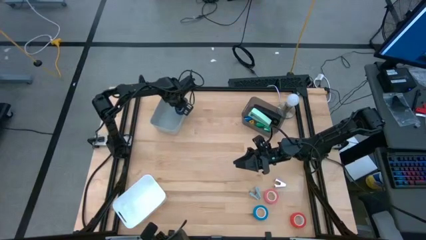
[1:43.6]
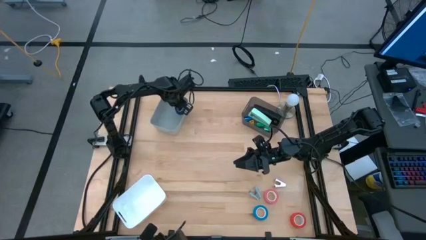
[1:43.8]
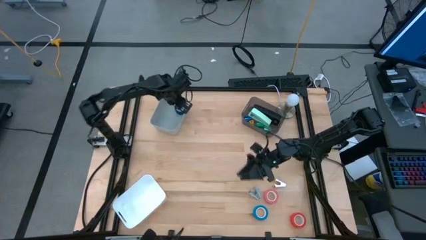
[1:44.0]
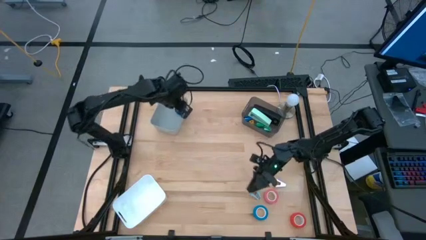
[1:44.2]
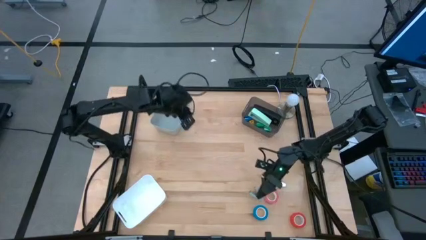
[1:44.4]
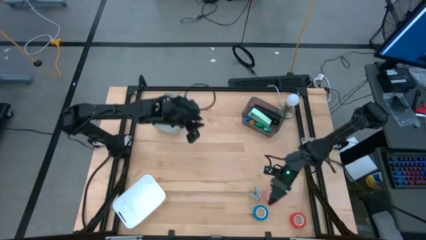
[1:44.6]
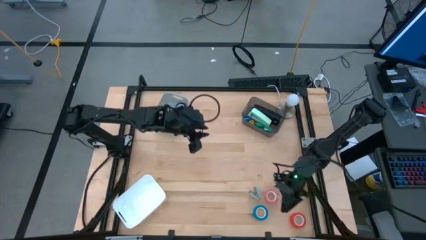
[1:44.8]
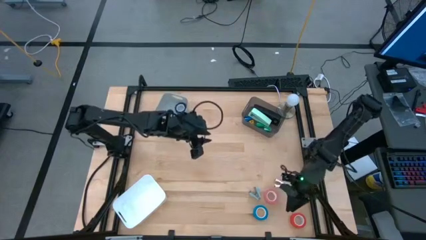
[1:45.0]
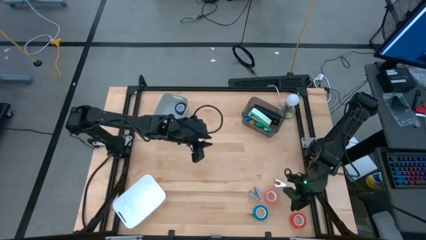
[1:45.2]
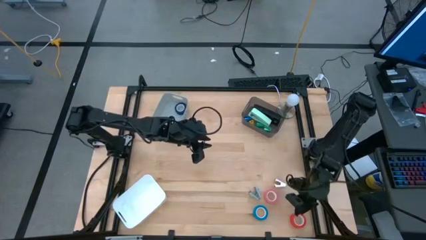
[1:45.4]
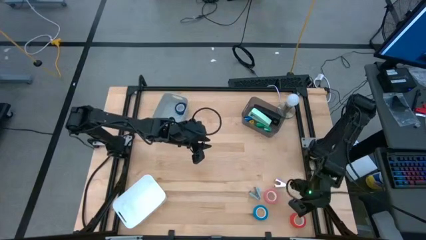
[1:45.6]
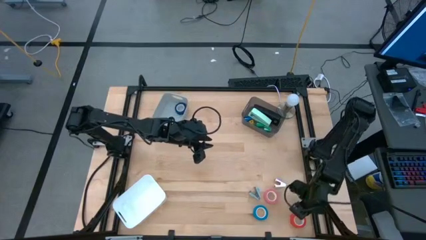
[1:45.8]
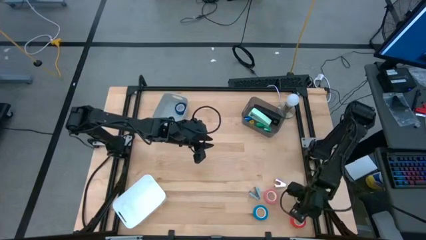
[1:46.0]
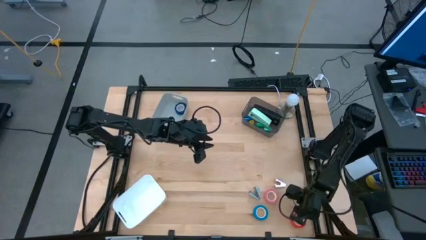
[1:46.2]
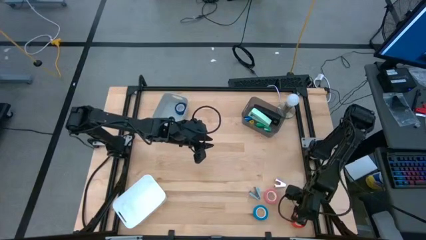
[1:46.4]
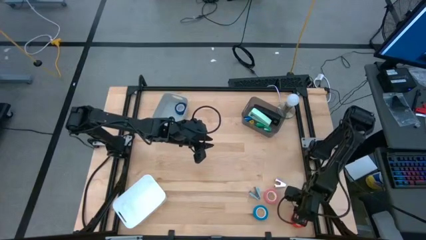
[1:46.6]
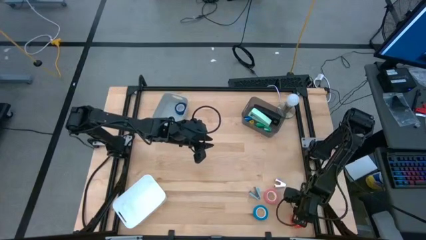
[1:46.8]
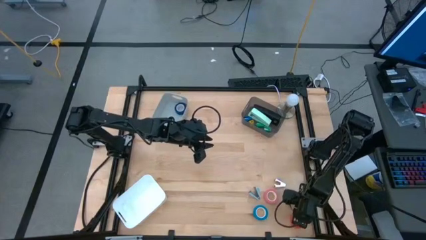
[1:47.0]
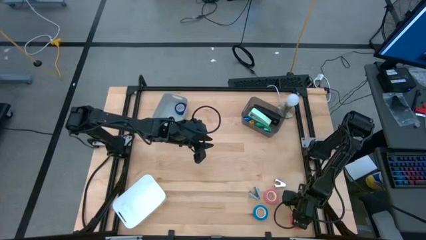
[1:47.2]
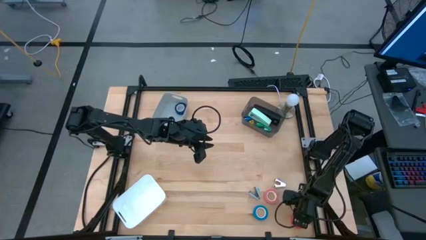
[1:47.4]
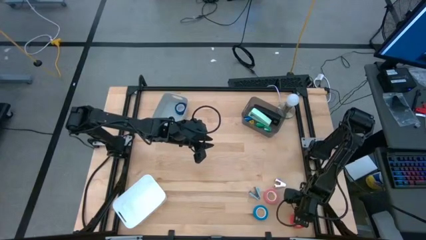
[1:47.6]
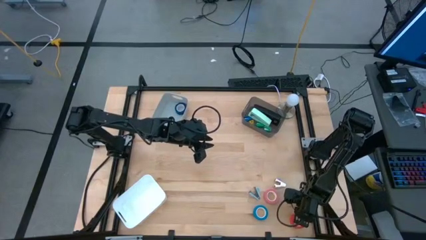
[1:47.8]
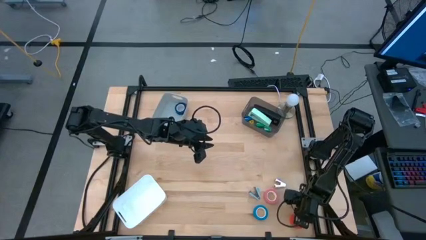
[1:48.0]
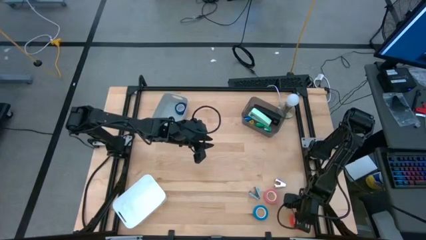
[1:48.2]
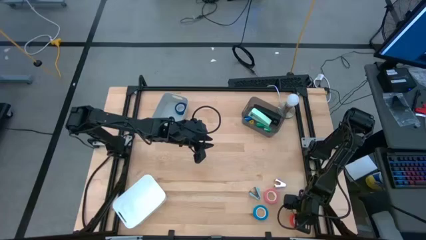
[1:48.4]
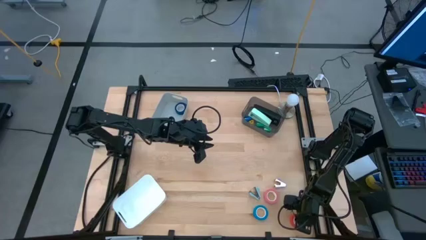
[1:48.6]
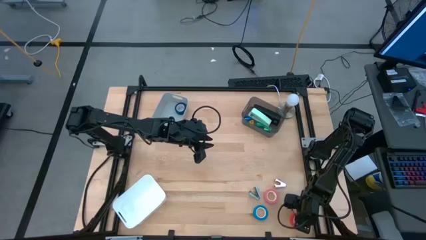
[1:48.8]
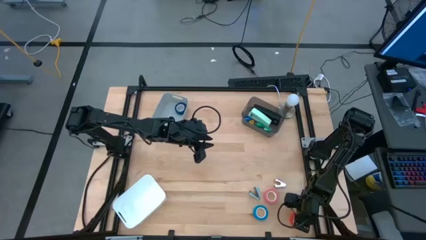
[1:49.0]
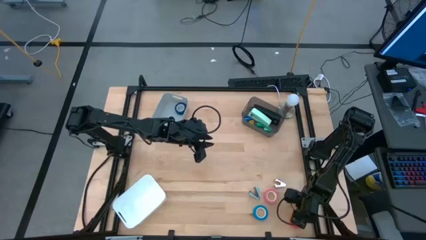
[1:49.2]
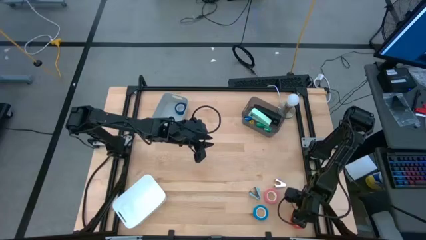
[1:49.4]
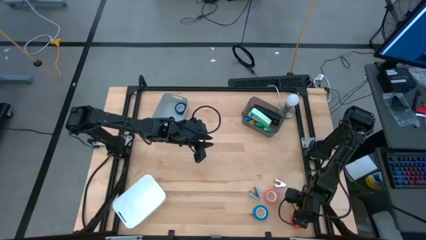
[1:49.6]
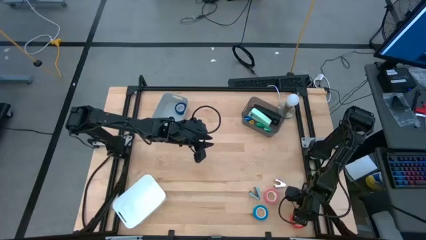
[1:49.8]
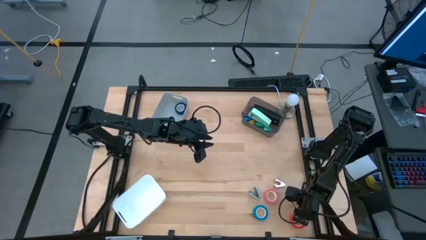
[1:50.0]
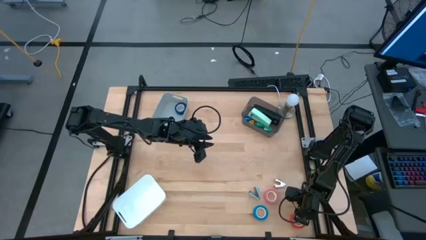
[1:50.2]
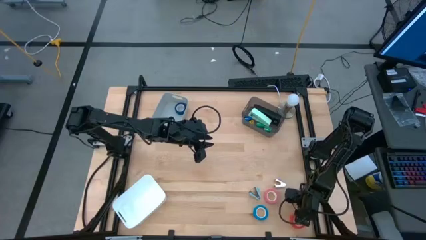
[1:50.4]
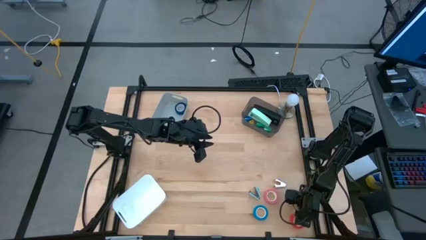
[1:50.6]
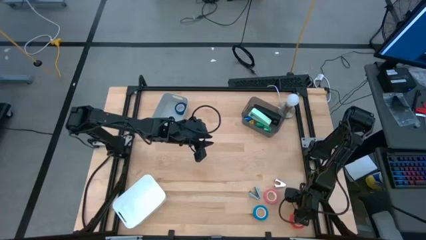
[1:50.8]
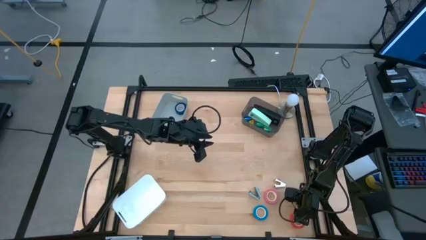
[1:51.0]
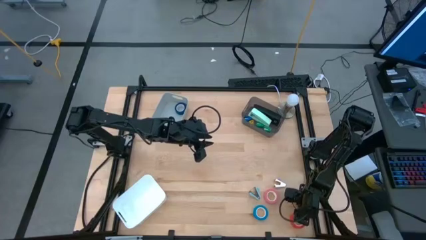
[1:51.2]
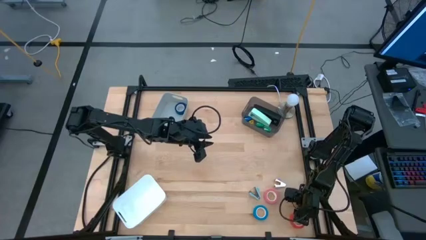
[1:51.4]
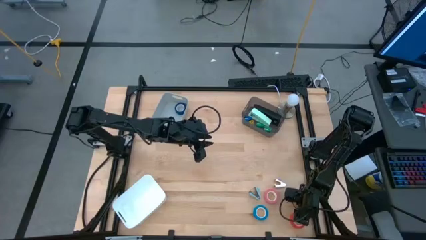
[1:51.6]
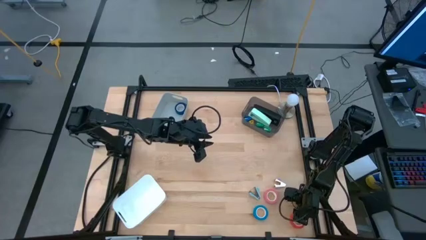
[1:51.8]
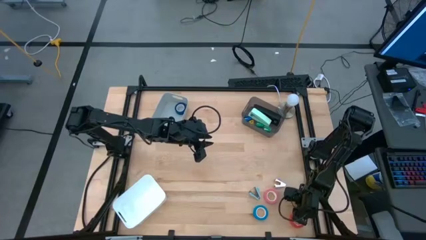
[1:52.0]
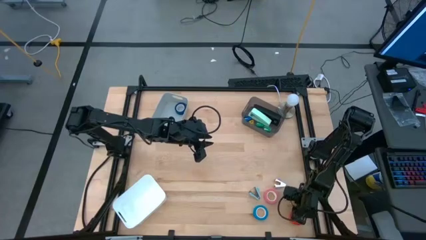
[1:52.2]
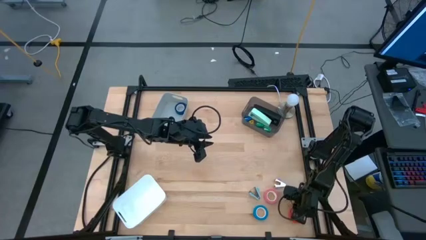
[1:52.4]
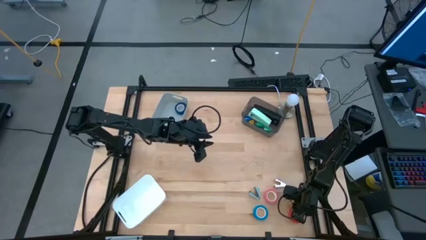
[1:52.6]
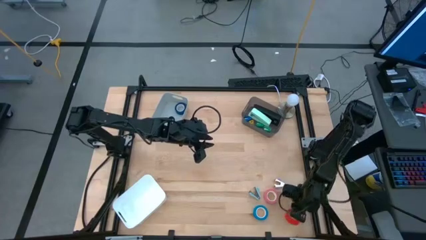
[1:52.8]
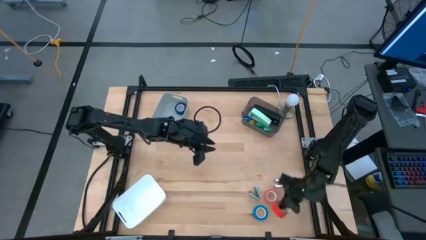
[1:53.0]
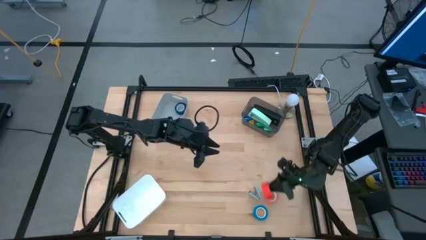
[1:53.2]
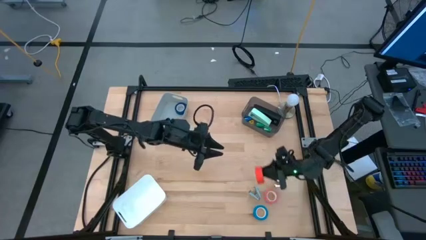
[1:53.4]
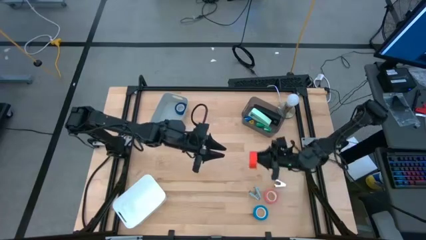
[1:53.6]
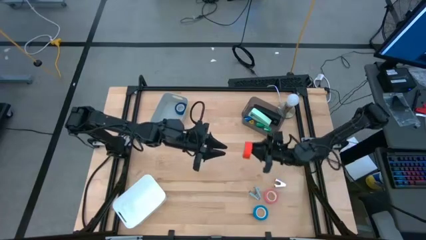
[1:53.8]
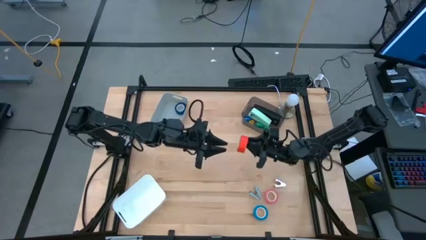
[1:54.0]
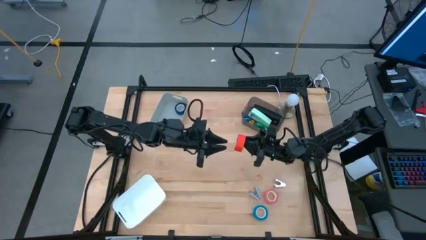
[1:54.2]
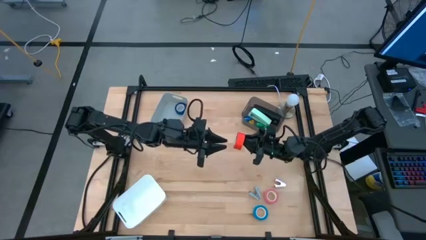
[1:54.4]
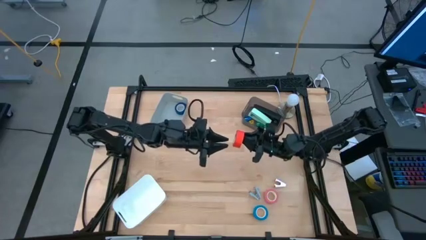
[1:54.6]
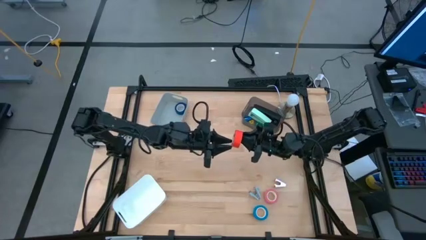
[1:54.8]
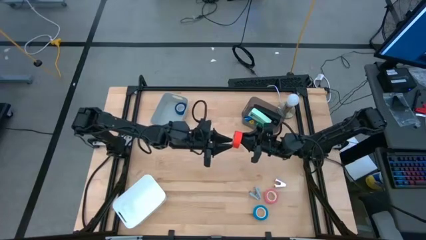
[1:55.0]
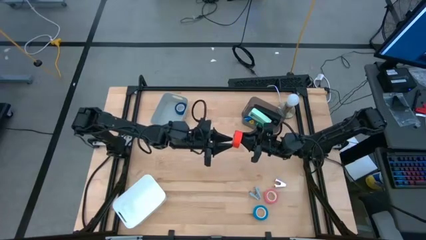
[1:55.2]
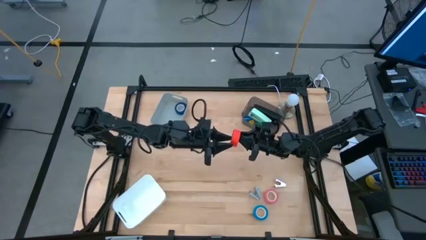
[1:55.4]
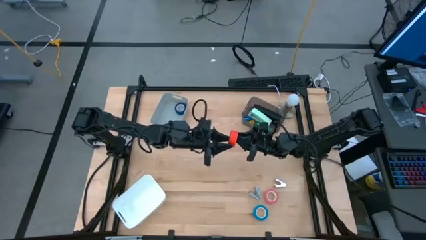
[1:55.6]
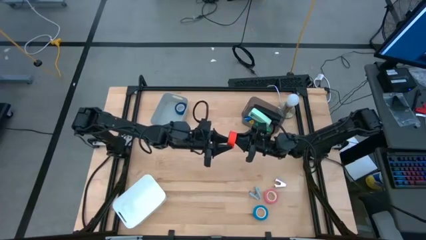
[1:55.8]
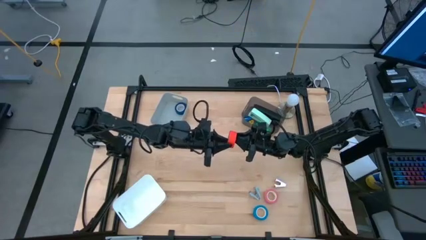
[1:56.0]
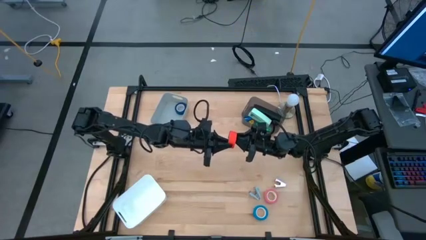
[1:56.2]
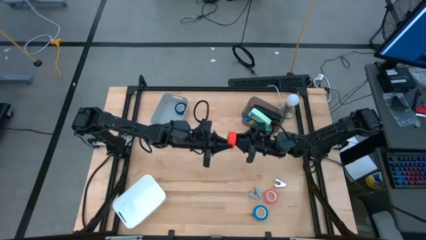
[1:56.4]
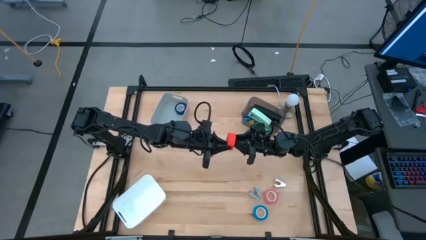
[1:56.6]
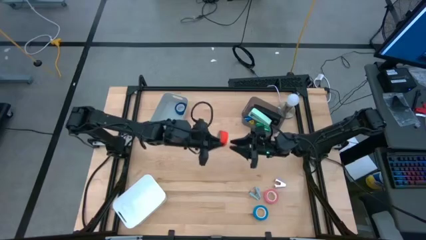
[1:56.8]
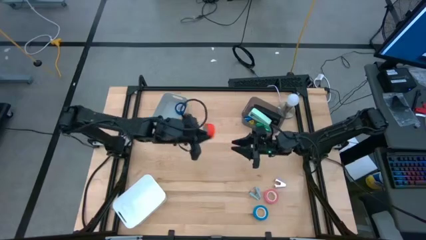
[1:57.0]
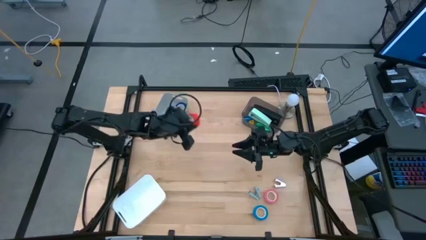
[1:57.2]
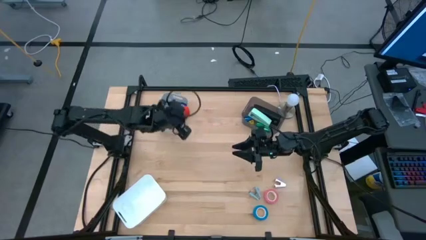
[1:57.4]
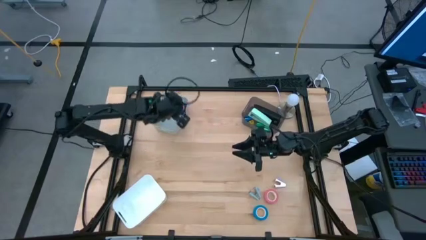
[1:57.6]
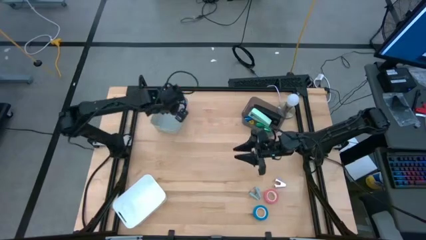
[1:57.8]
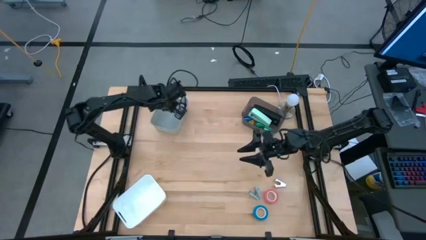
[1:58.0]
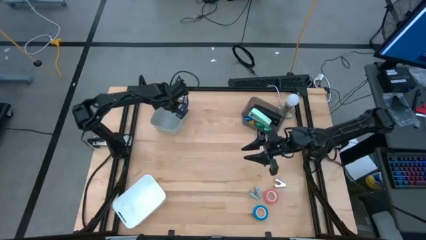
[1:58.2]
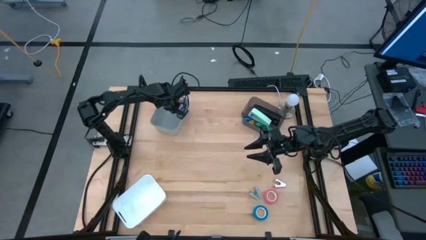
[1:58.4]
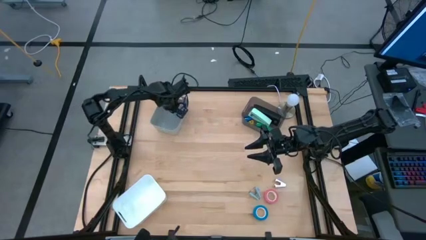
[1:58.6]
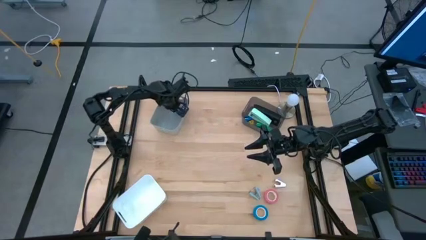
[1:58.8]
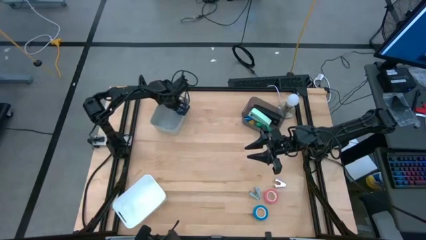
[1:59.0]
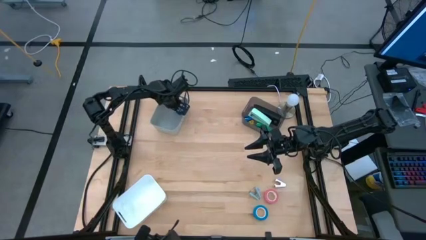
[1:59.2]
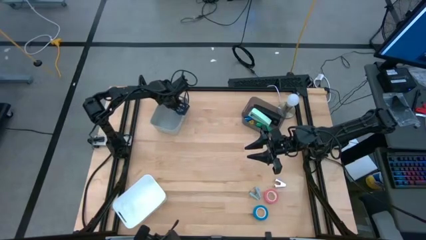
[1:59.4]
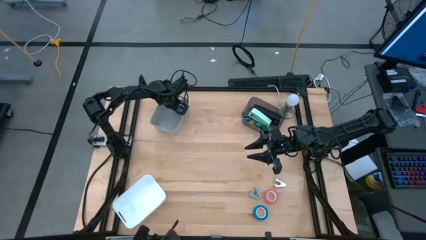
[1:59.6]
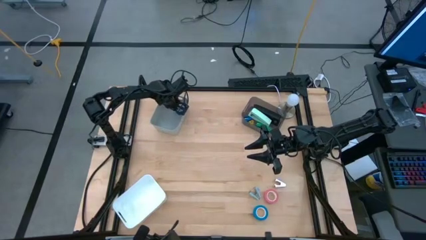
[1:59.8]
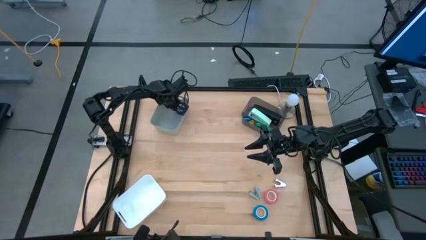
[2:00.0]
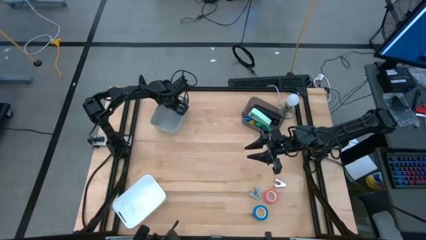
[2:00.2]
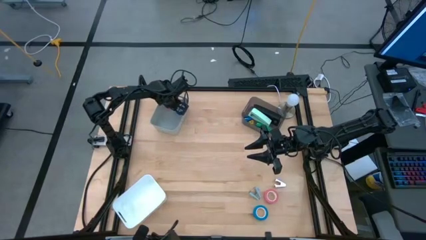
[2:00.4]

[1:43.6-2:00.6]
Task: Pick and place Stapler, Stapler remover, tape
Put the orange tape into the gray bin
